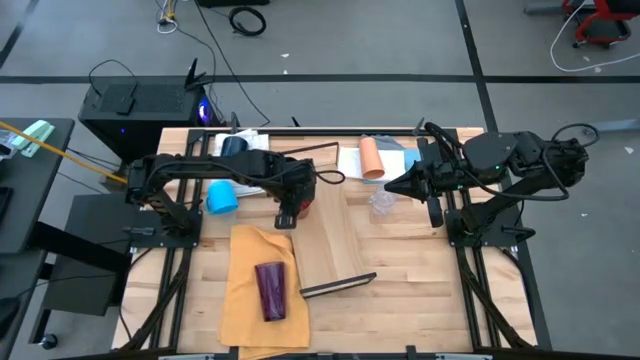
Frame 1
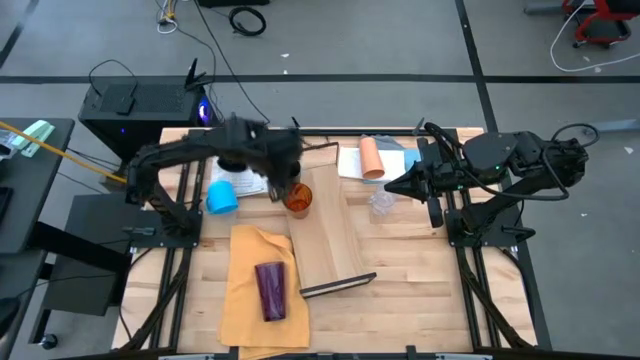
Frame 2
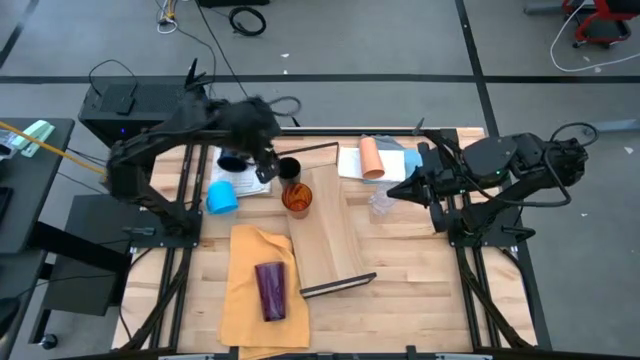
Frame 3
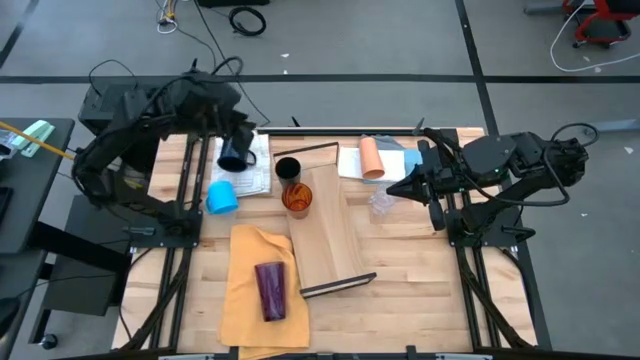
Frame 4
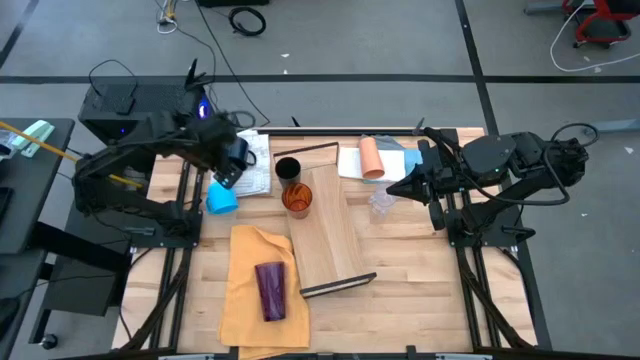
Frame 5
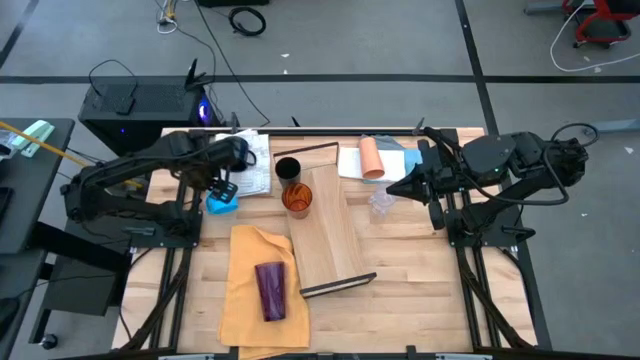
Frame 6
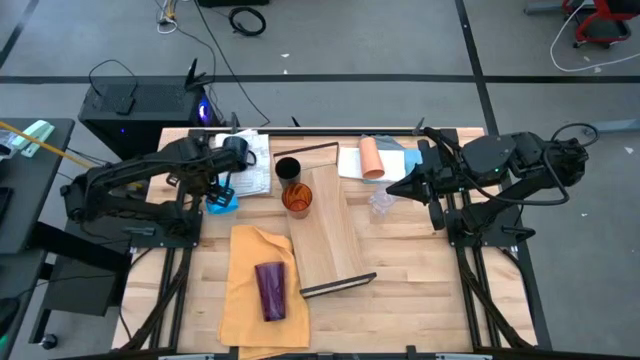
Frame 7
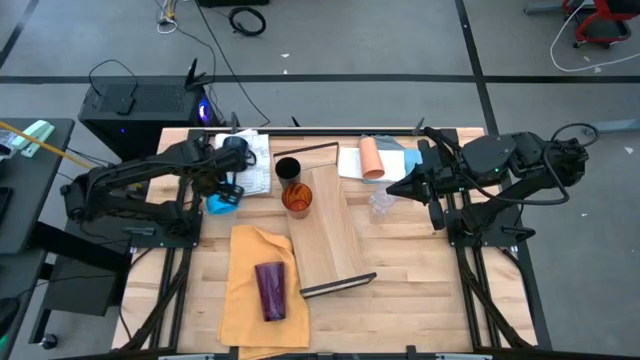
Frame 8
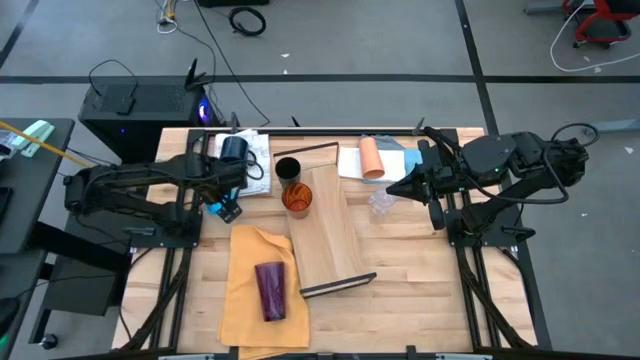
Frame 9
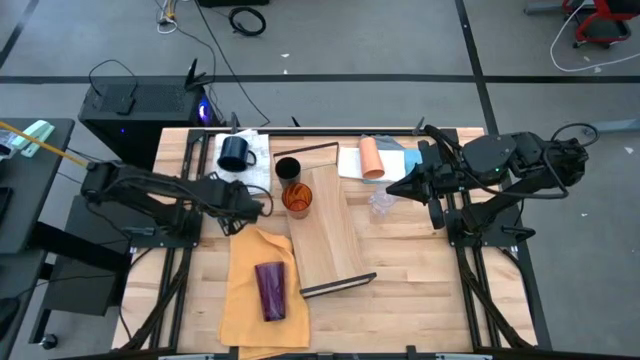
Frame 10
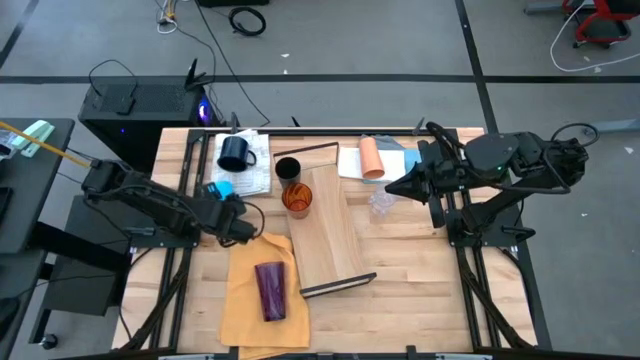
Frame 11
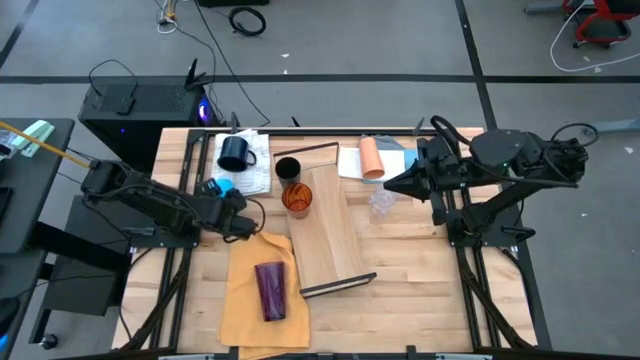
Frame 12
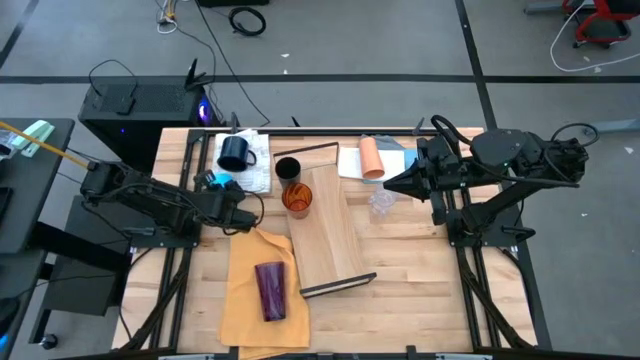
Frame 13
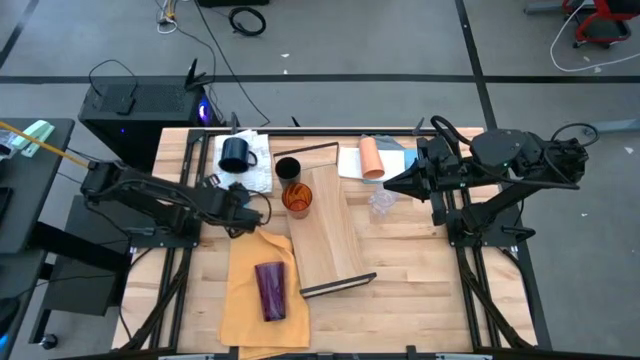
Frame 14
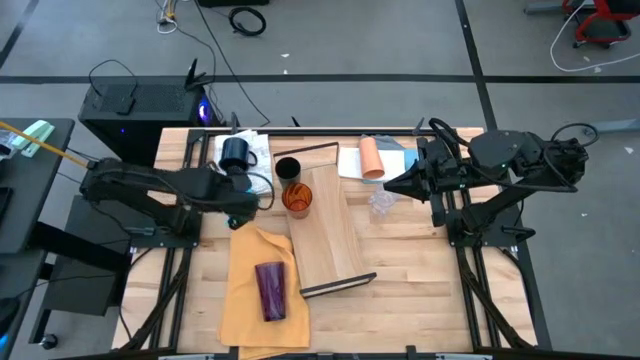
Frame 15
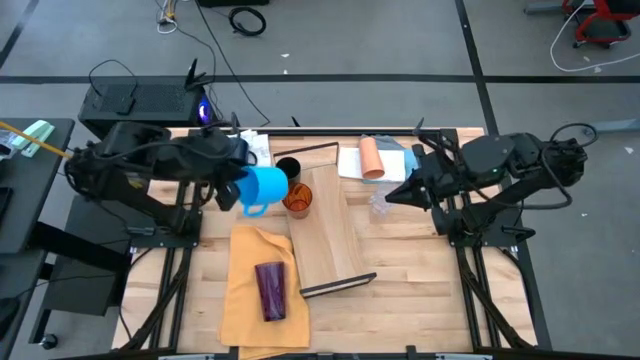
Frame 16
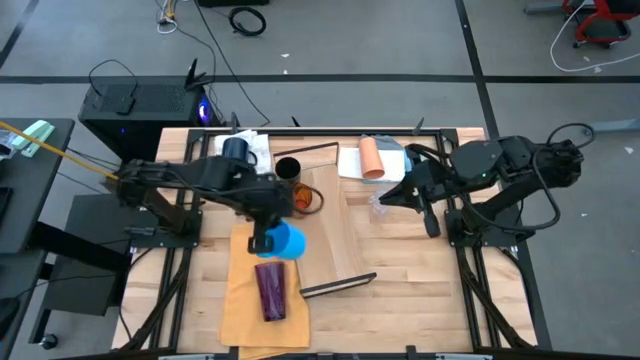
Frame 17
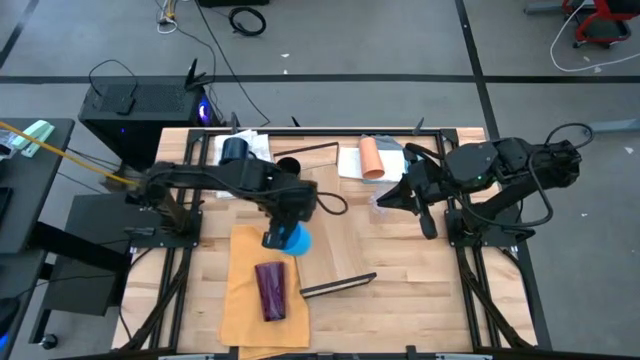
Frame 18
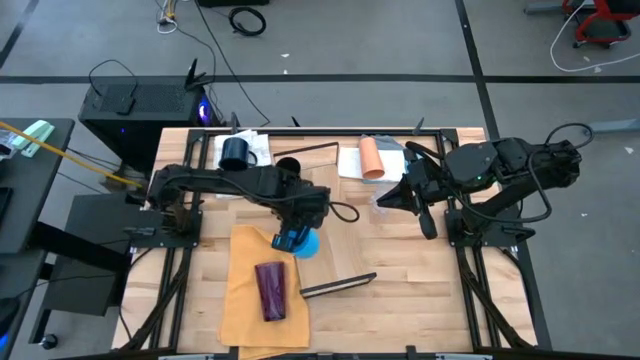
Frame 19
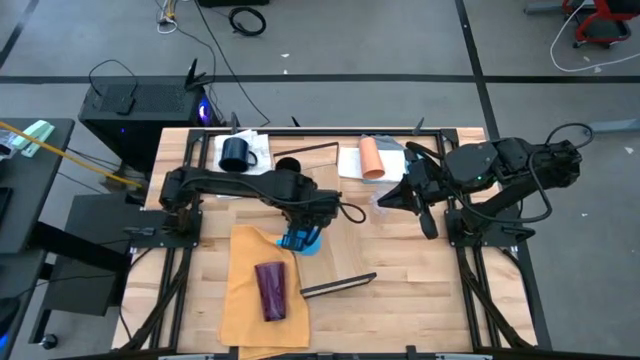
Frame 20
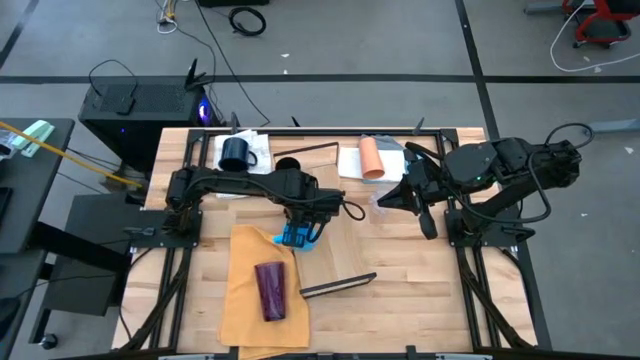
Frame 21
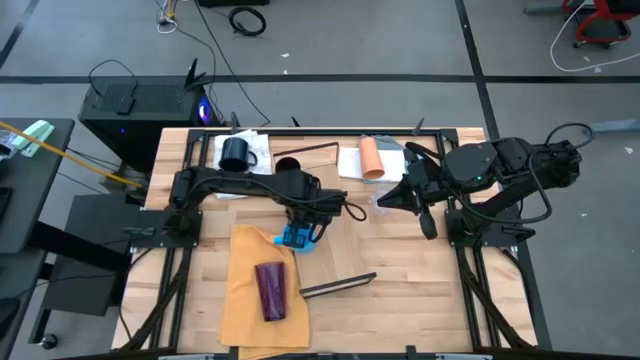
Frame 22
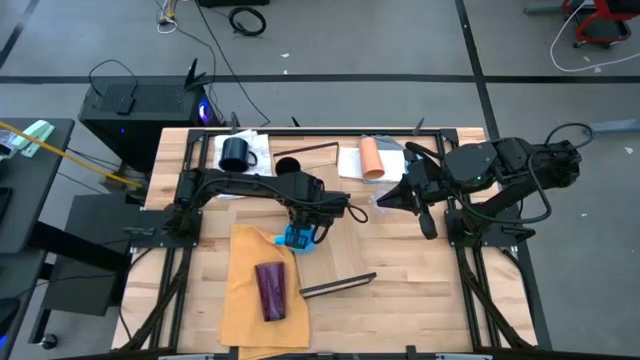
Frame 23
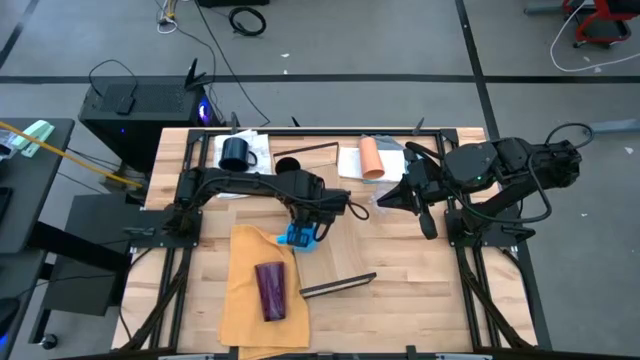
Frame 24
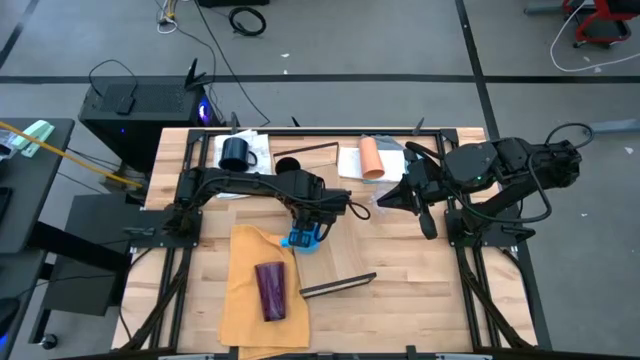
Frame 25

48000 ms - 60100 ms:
Task: Stack small to large cups/mugs on shelf
Put the blue mug on the shelf

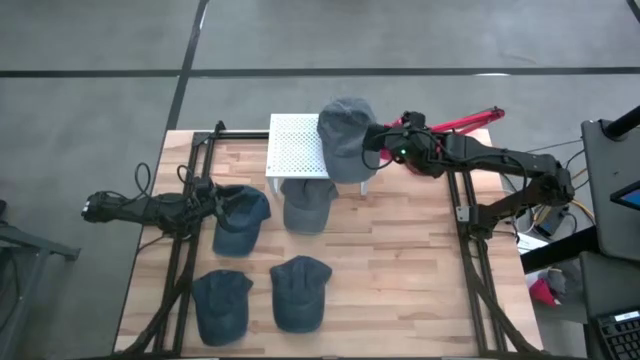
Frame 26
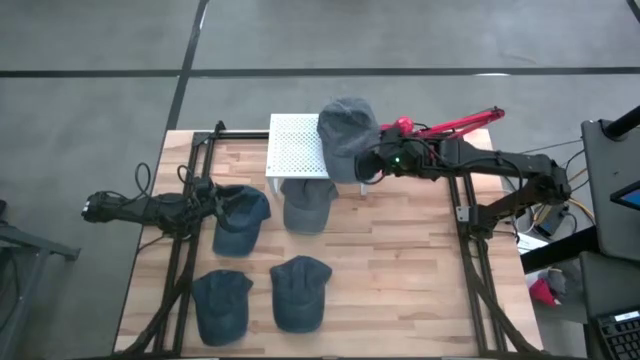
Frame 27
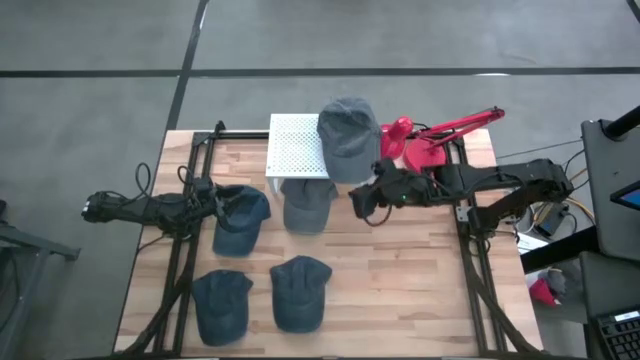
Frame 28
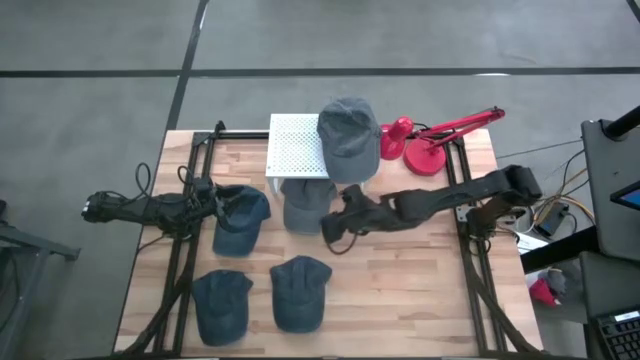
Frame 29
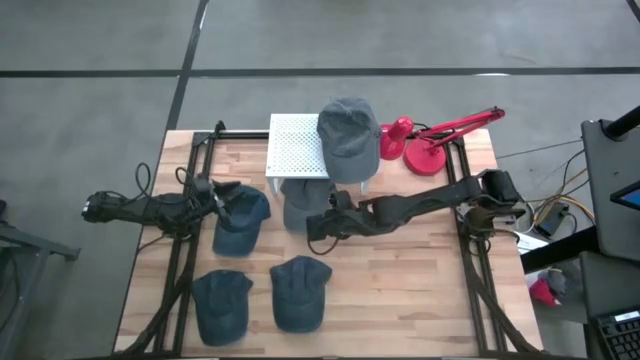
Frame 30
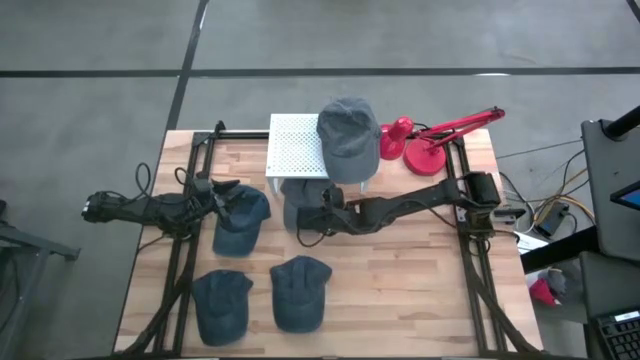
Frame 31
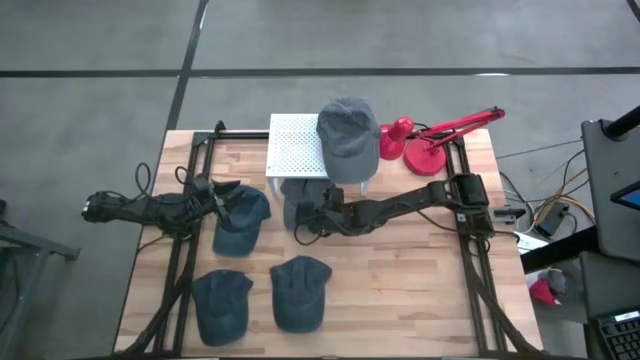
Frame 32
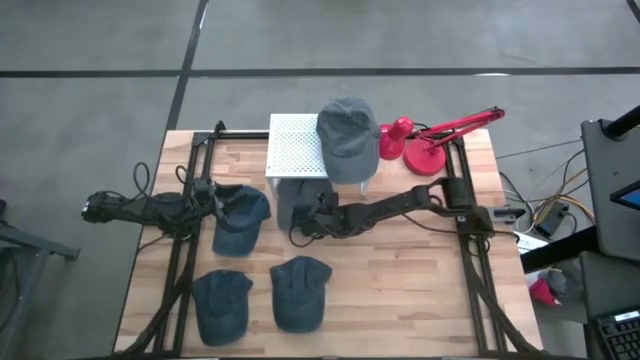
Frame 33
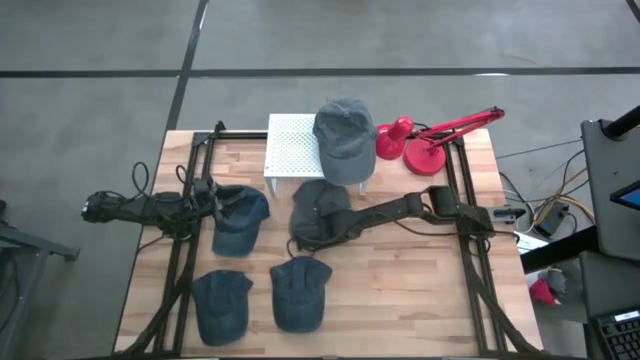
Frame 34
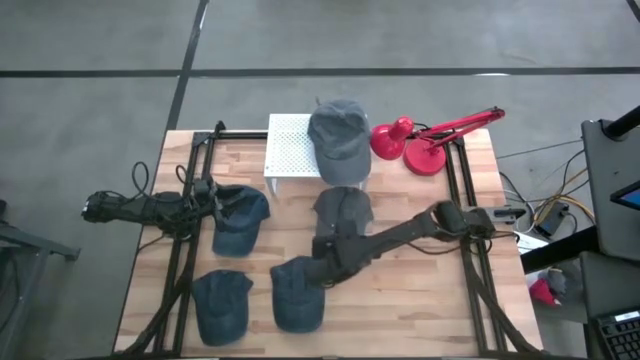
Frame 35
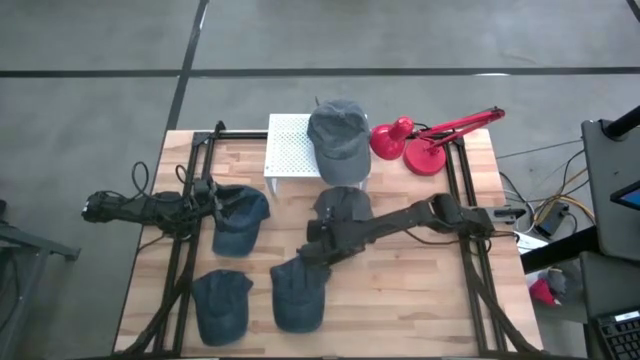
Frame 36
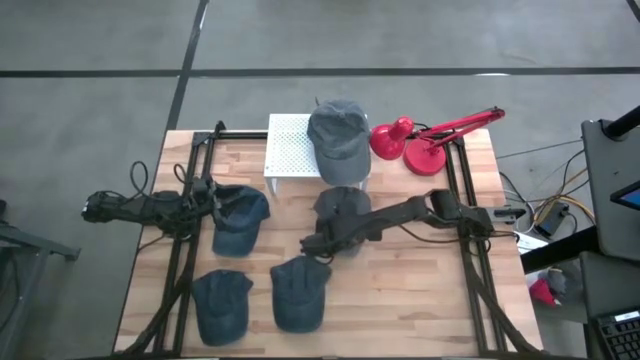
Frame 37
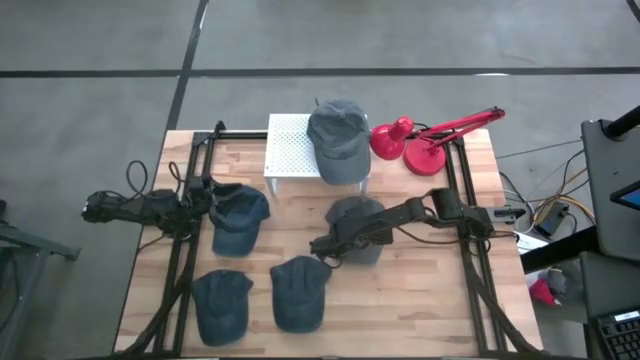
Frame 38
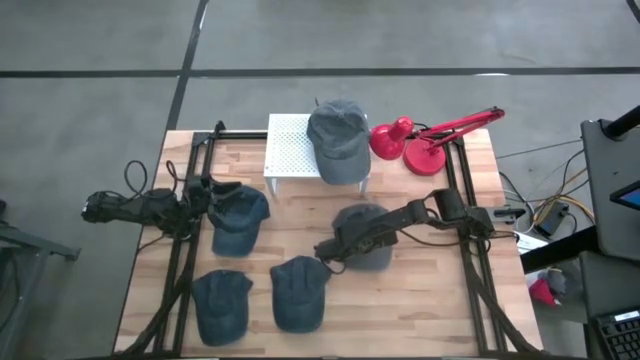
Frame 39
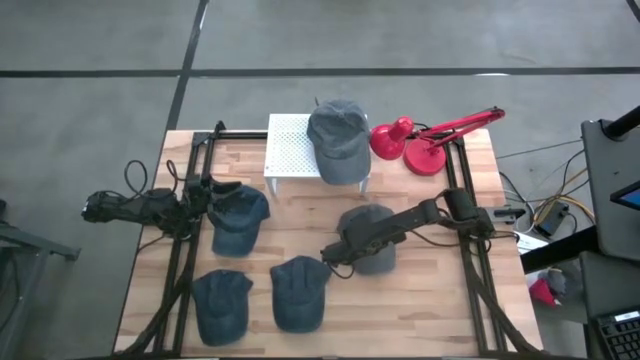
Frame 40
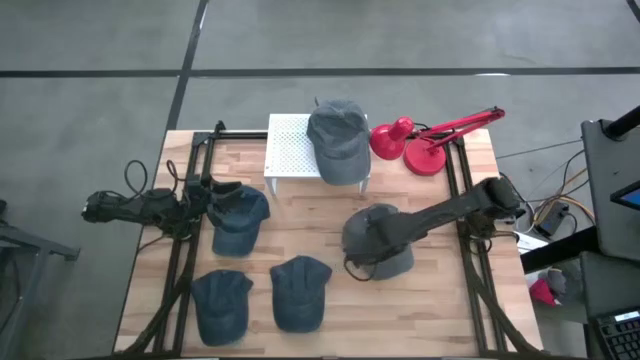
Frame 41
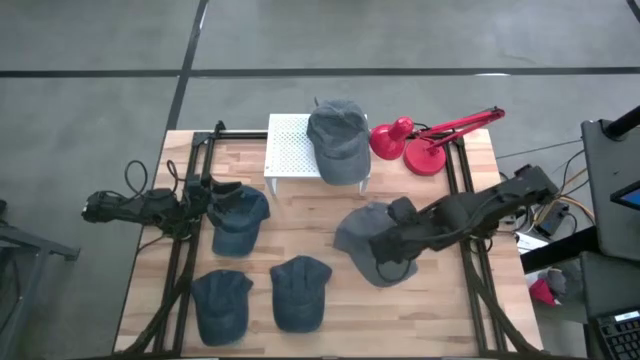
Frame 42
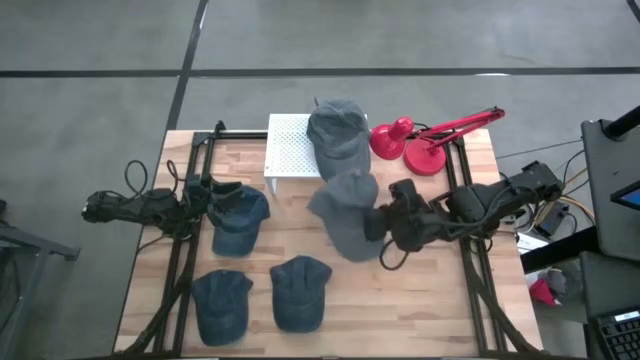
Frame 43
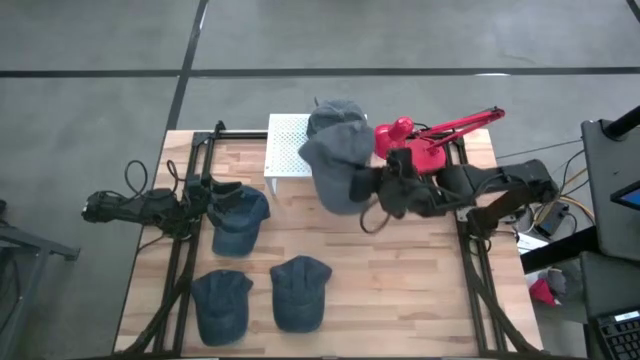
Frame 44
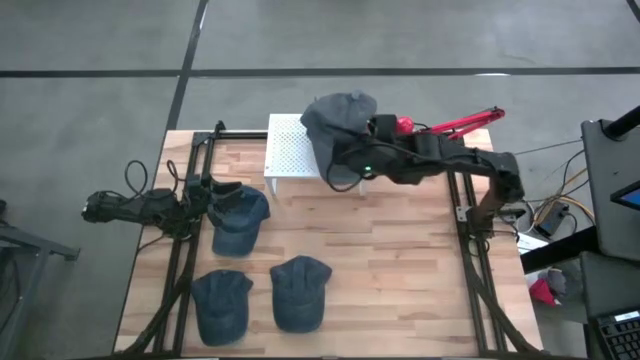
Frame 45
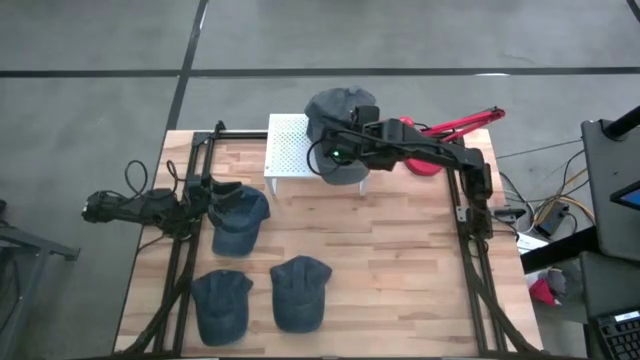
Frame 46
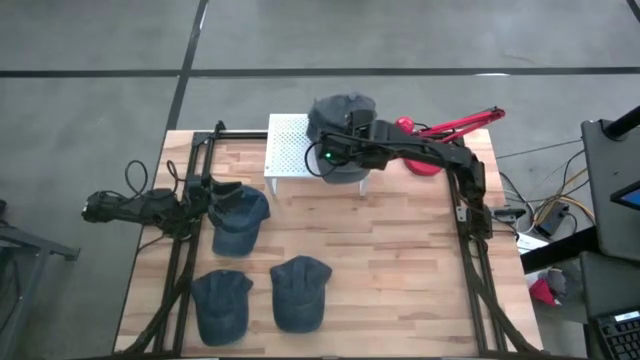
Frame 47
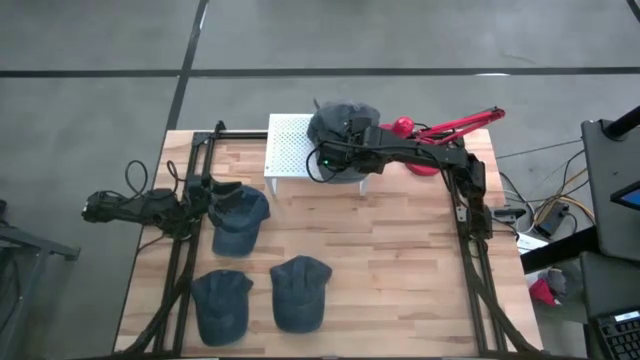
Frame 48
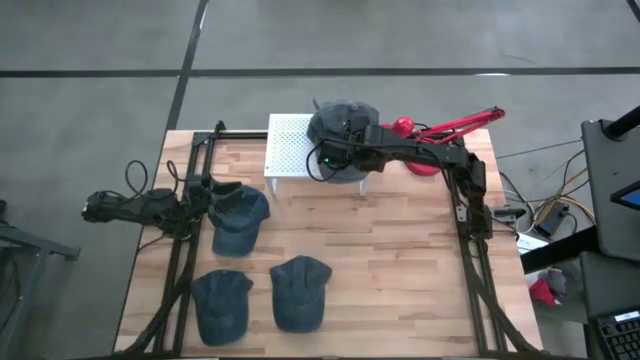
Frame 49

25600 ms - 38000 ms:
Task: Stack small to large cups/mugs on shelf
Stack the gray cup on the other gray cup on the shelf
